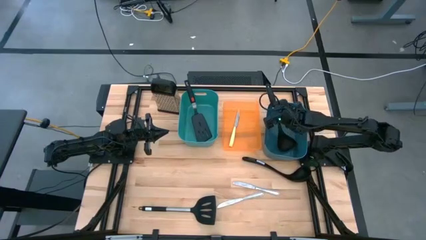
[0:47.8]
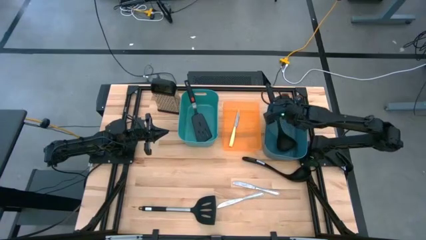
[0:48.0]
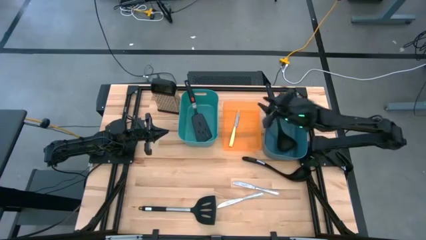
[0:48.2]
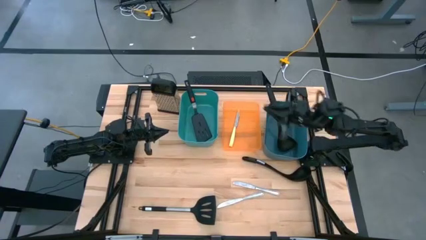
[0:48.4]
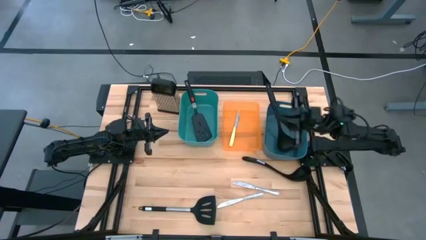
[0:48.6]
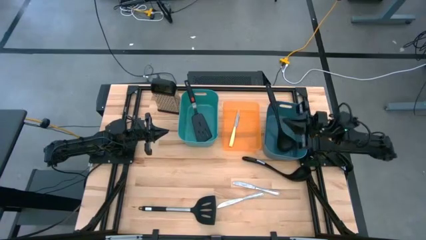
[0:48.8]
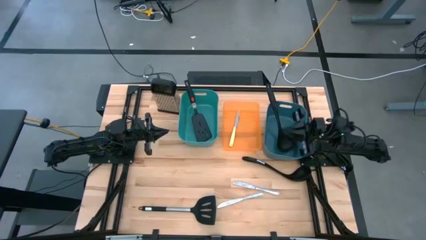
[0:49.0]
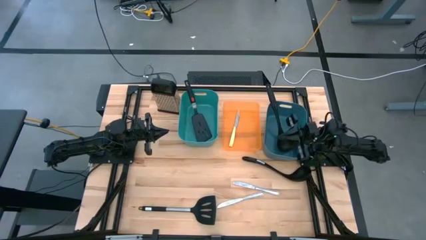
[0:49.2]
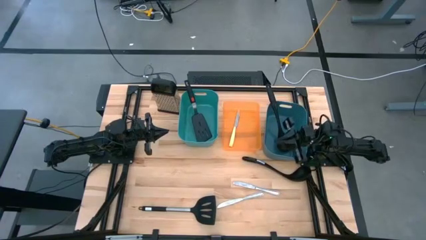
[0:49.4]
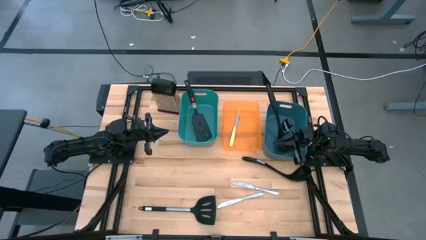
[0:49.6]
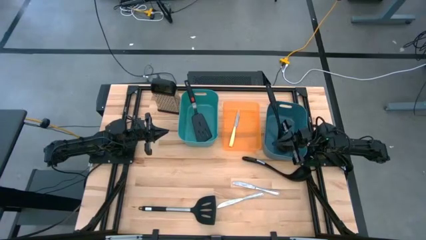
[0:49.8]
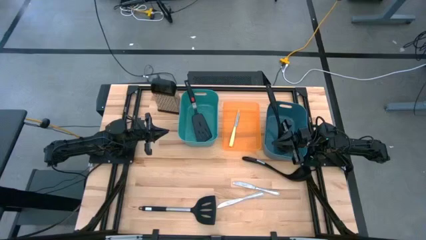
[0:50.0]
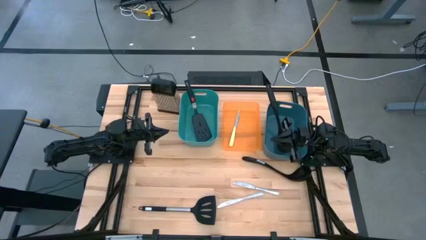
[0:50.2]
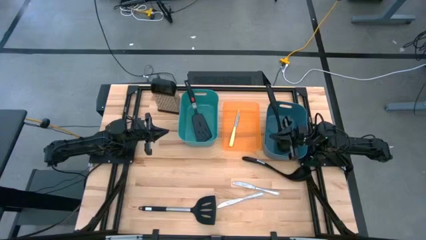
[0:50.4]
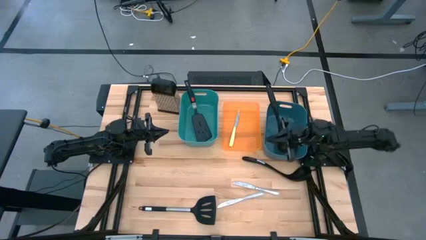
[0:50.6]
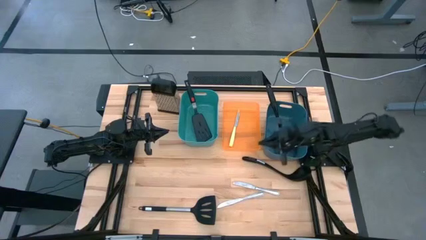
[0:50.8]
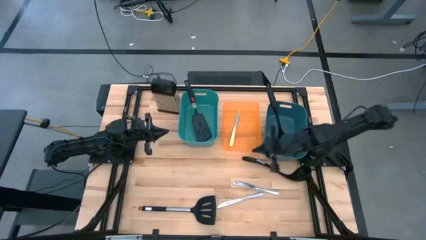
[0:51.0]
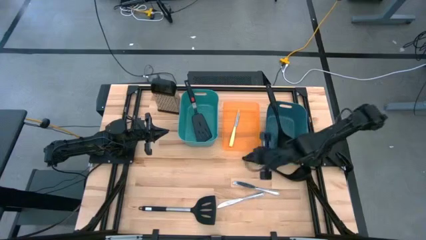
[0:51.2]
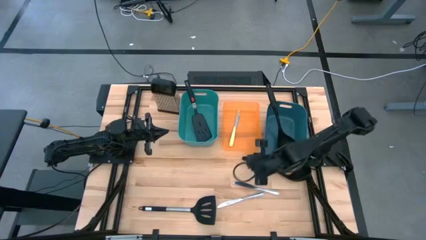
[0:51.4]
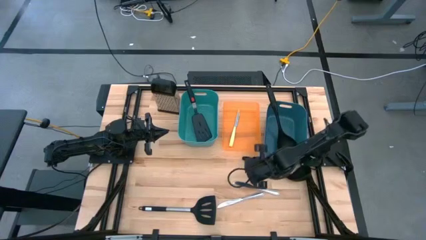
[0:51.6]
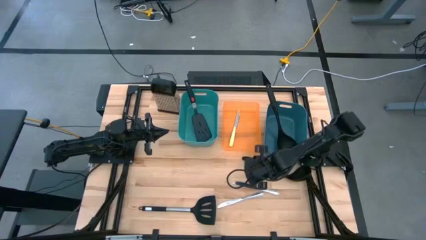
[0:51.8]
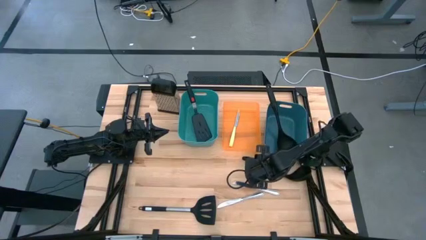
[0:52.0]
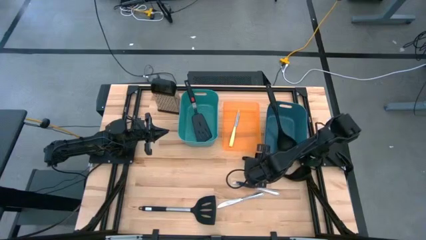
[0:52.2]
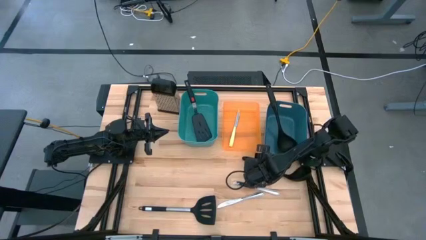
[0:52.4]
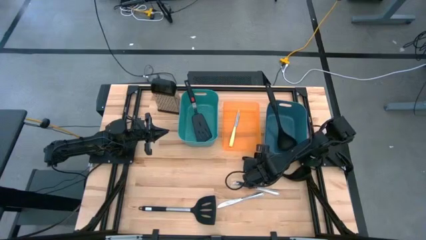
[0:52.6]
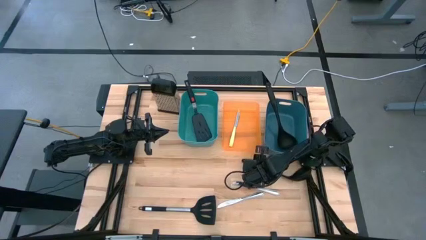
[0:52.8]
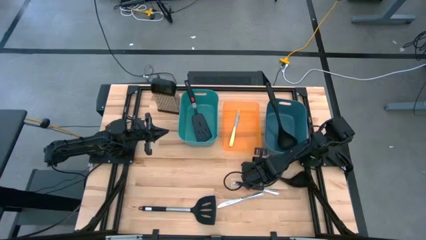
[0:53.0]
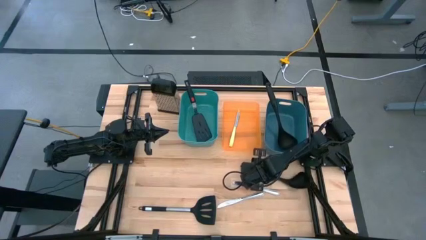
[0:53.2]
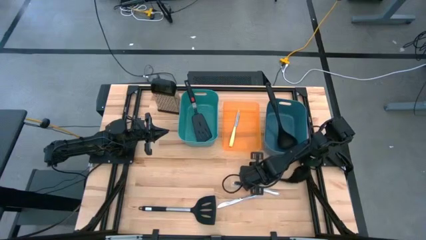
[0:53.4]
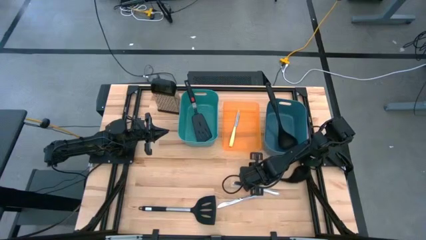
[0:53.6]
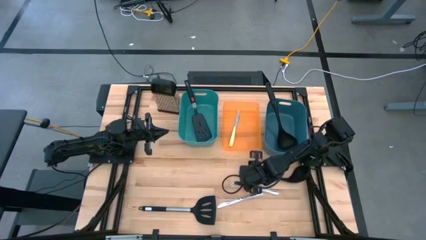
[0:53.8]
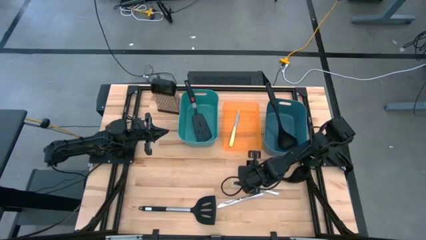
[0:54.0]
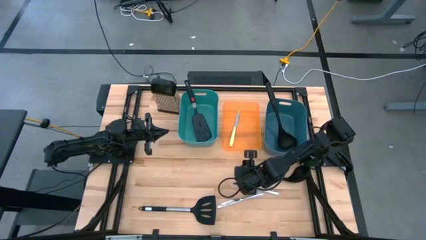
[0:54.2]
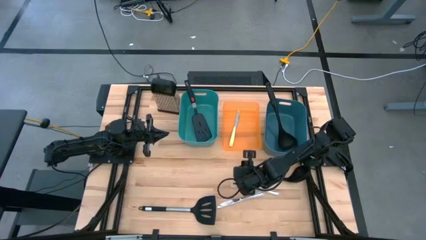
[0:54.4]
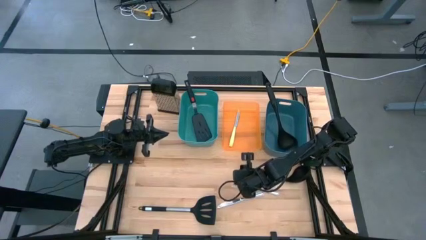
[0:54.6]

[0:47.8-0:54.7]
Task: Pick & Place Kitchen Items
Put the black spatula into the green bin

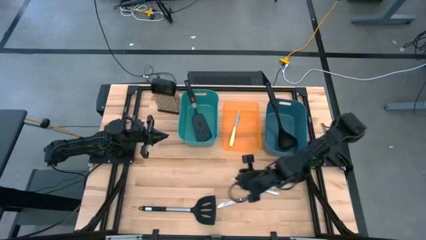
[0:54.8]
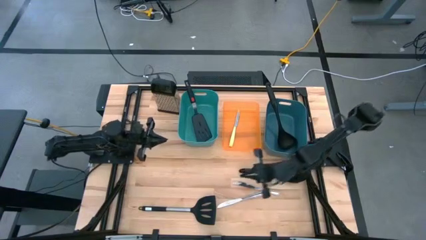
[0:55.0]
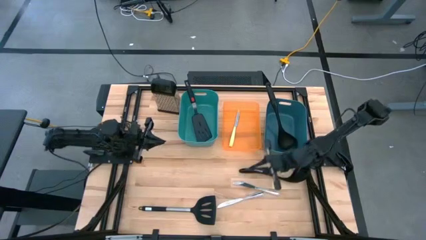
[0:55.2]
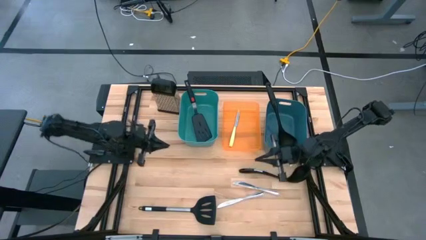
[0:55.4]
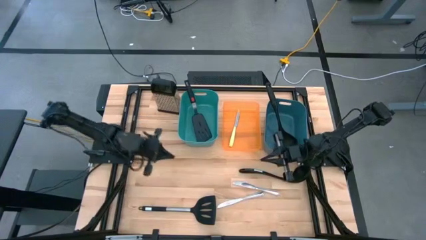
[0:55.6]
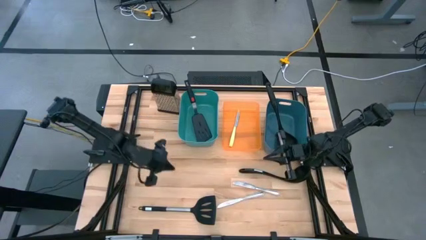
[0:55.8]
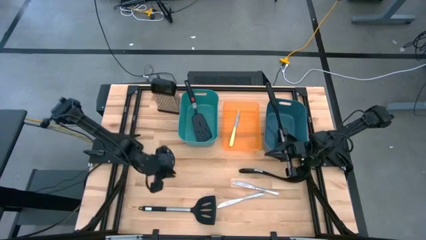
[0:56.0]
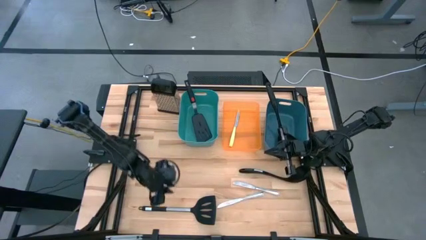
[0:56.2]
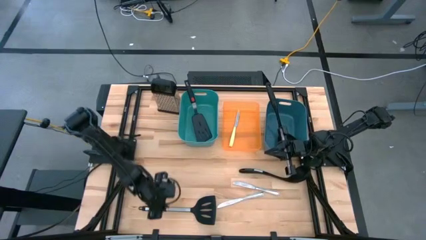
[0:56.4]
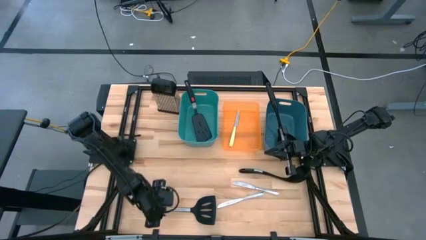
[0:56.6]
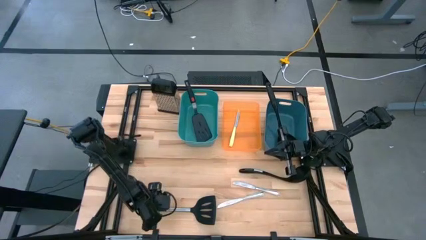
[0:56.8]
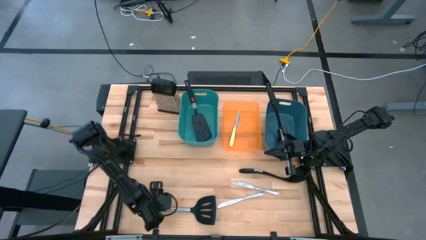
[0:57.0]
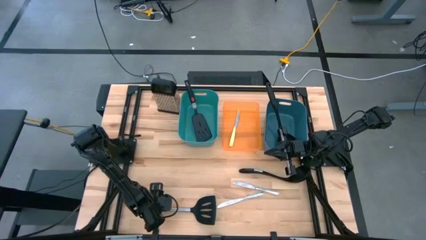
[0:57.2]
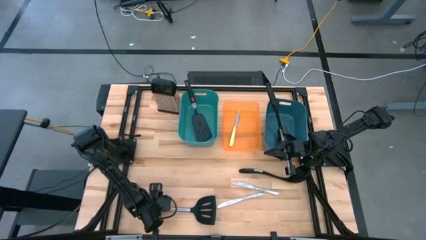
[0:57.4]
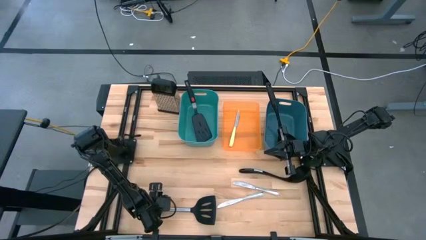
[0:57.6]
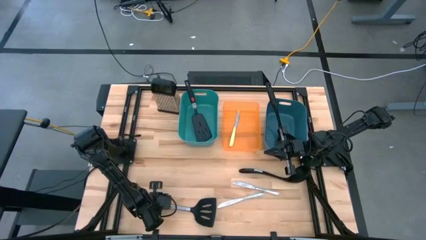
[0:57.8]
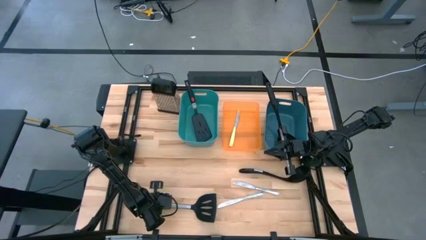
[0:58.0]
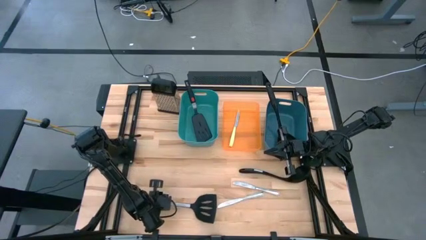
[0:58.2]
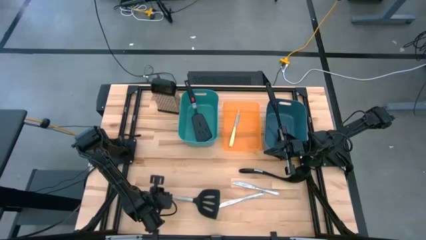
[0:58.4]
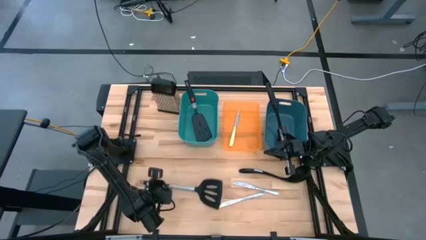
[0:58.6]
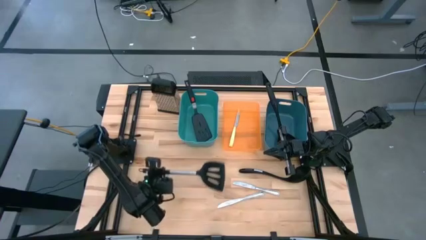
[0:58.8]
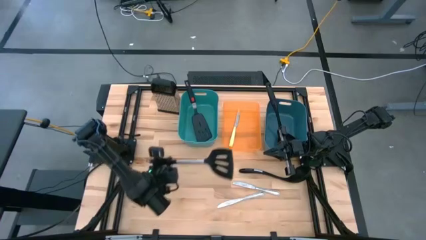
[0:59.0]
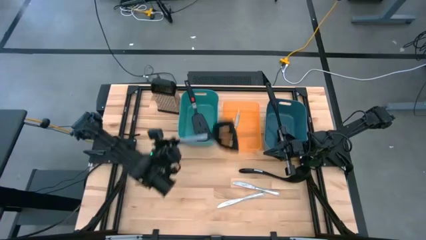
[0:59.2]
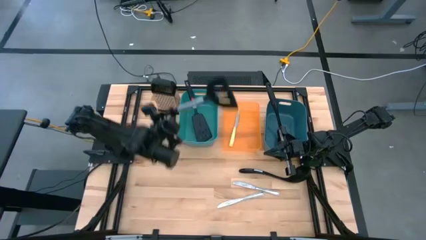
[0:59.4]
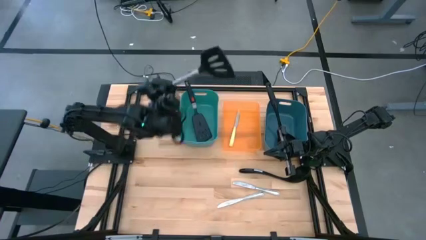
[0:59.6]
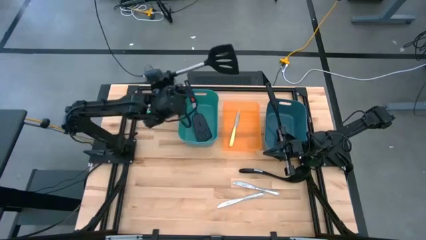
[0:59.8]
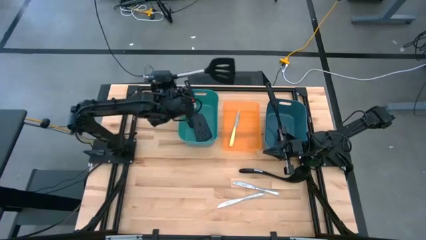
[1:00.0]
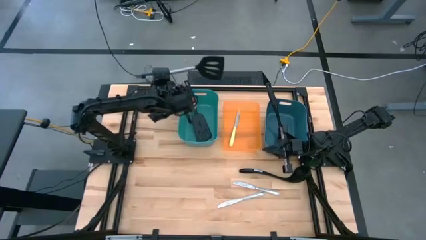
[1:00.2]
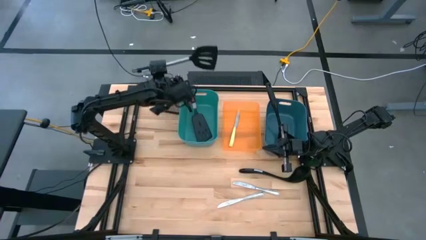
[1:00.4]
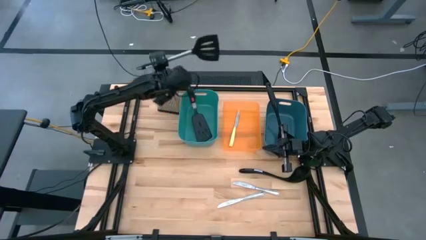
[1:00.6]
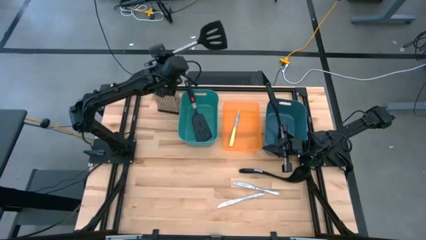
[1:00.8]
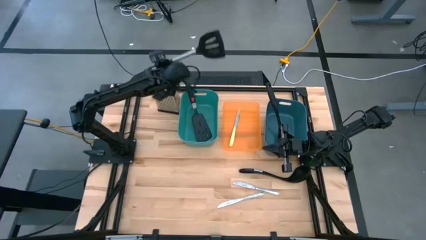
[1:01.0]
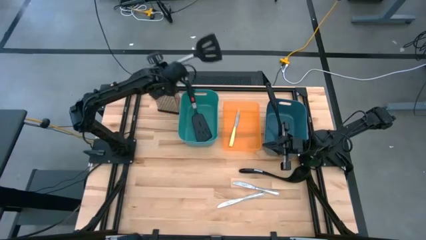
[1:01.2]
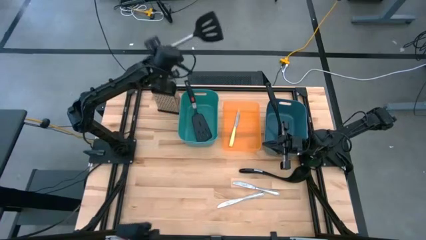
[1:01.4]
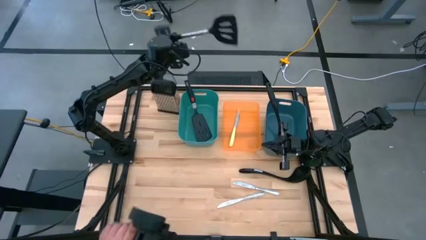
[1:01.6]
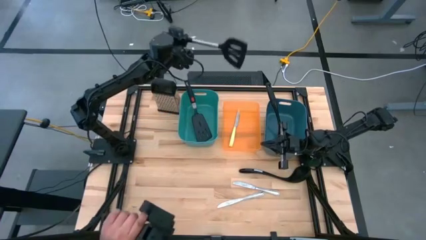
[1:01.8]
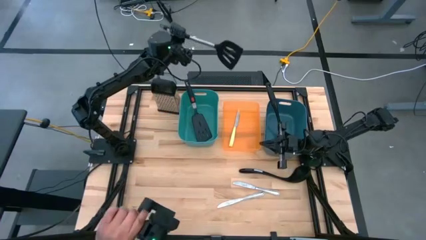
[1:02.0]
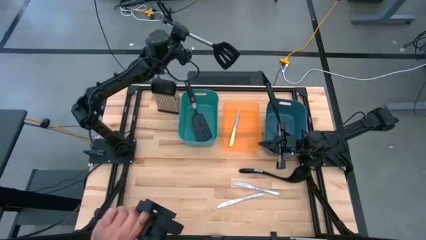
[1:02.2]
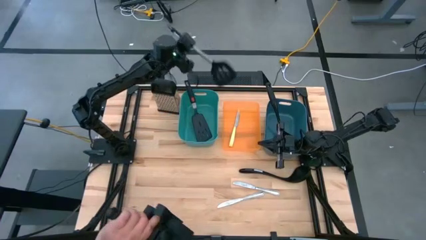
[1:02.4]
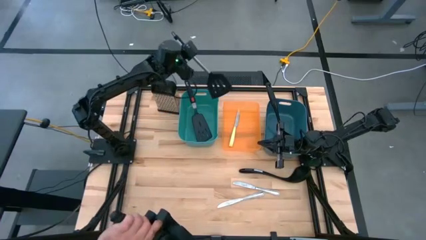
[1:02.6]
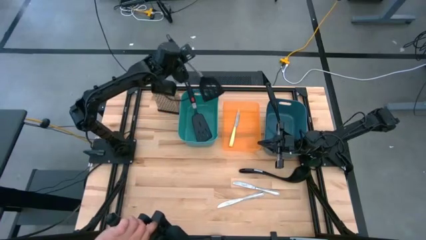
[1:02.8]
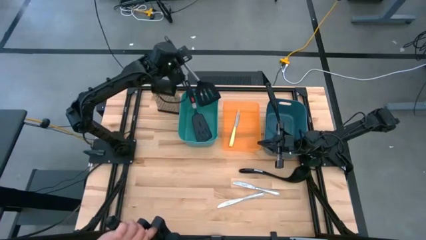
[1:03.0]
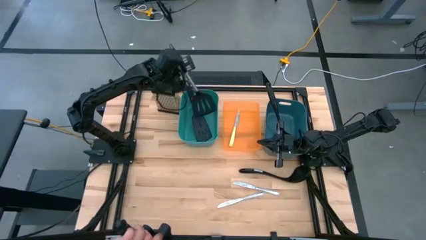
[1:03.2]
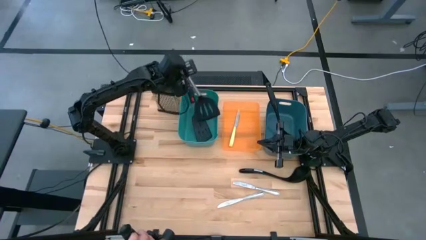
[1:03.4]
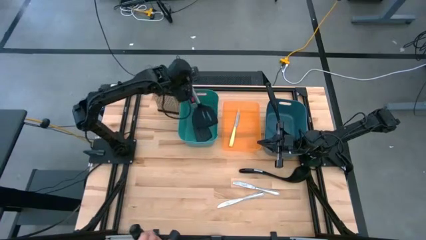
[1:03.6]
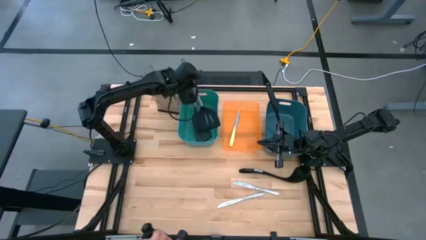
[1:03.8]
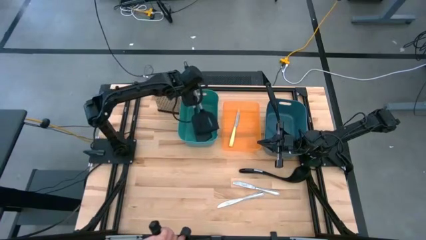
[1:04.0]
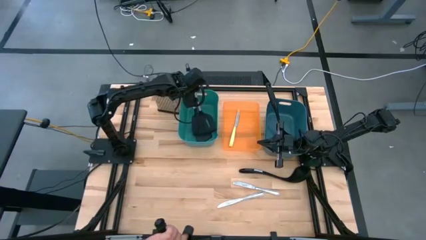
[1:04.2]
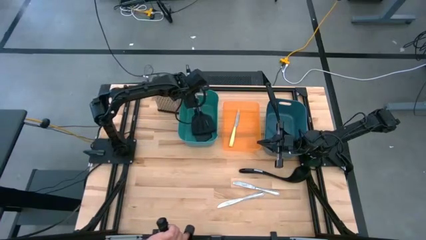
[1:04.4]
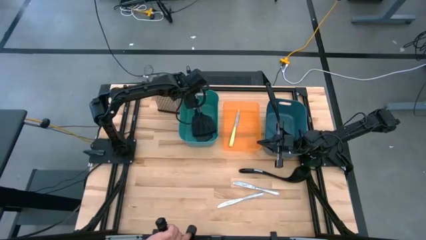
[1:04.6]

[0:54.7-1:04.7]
Put the black spatula into the green bin
